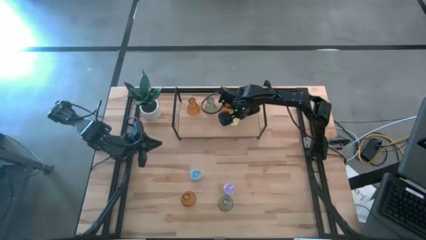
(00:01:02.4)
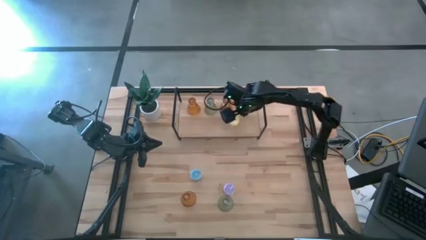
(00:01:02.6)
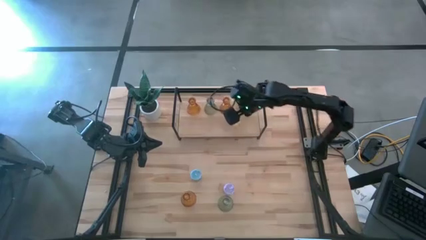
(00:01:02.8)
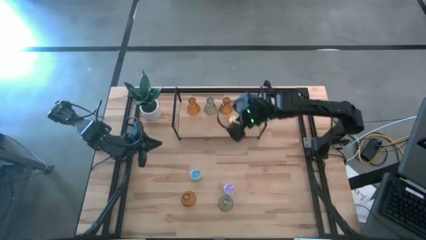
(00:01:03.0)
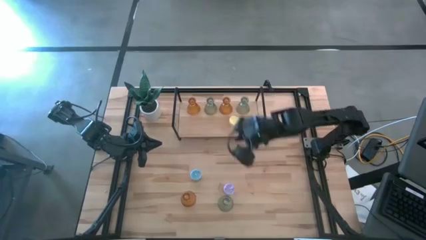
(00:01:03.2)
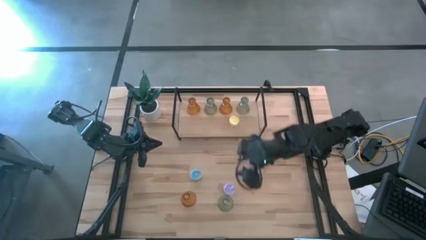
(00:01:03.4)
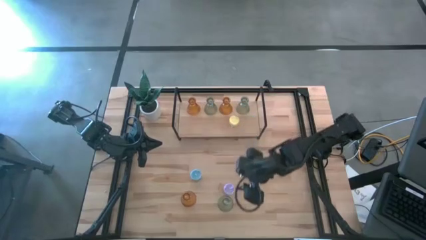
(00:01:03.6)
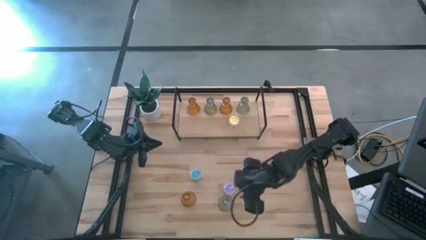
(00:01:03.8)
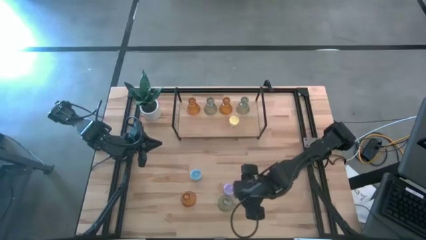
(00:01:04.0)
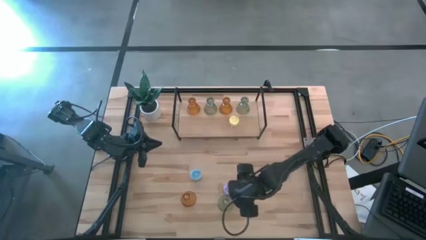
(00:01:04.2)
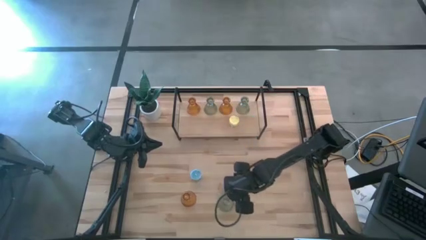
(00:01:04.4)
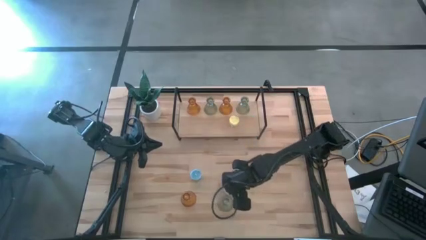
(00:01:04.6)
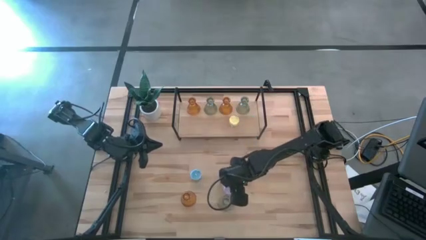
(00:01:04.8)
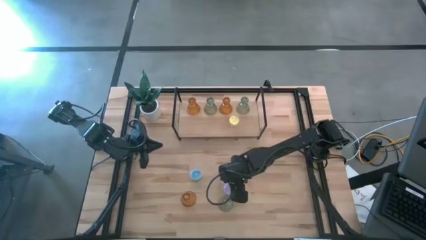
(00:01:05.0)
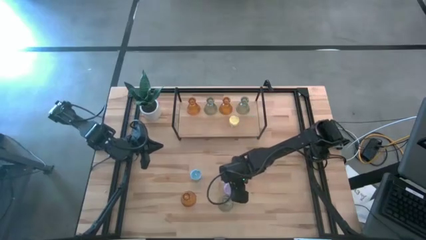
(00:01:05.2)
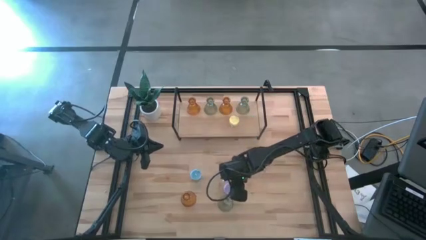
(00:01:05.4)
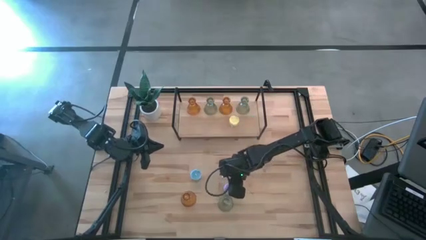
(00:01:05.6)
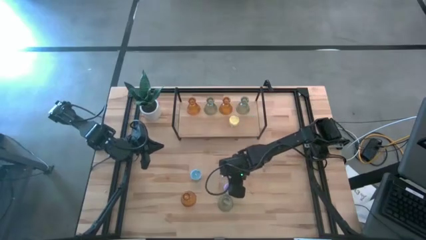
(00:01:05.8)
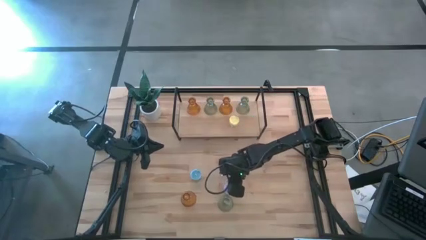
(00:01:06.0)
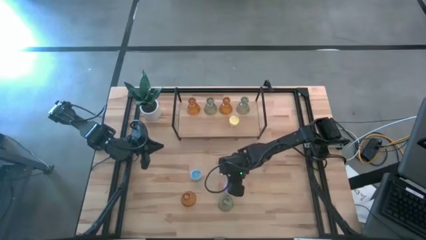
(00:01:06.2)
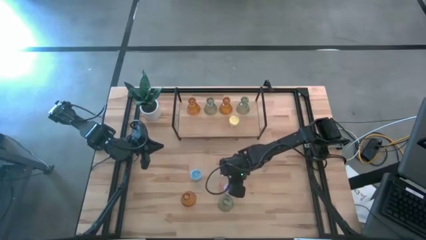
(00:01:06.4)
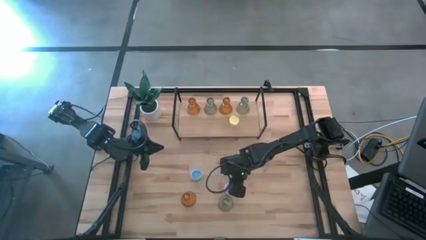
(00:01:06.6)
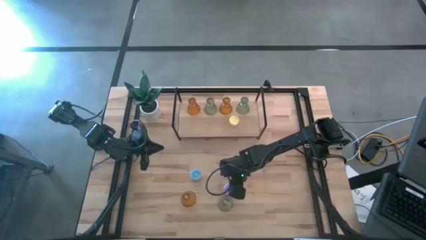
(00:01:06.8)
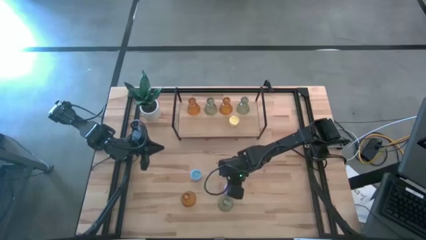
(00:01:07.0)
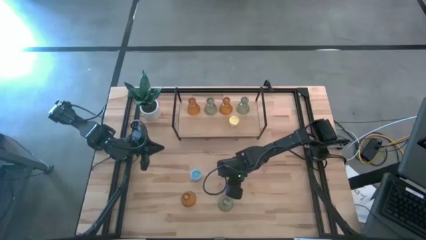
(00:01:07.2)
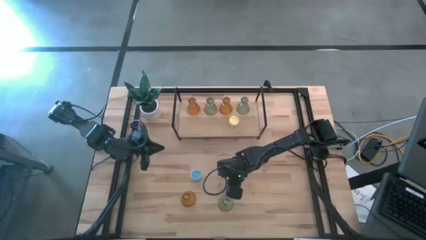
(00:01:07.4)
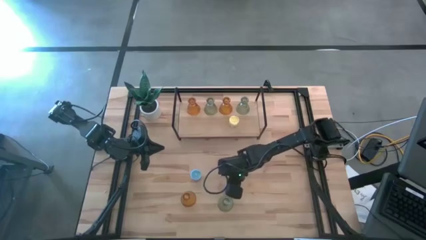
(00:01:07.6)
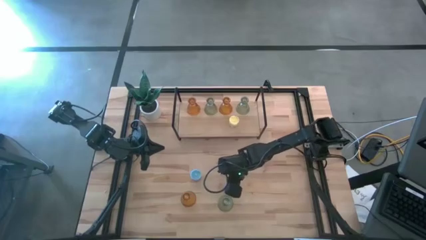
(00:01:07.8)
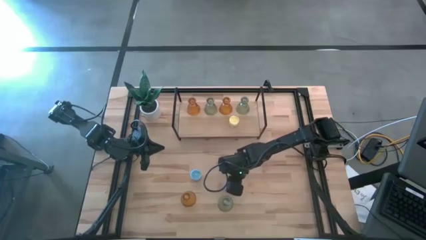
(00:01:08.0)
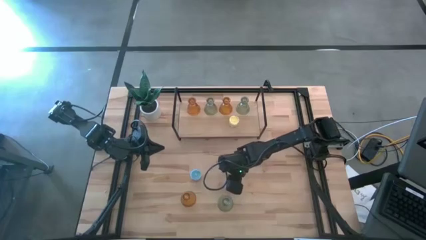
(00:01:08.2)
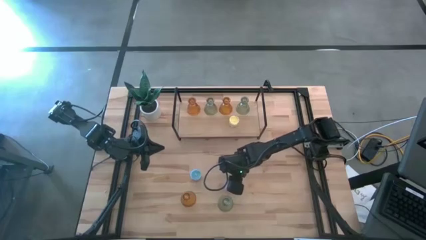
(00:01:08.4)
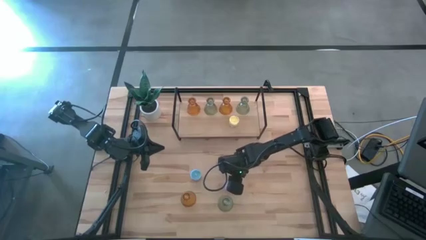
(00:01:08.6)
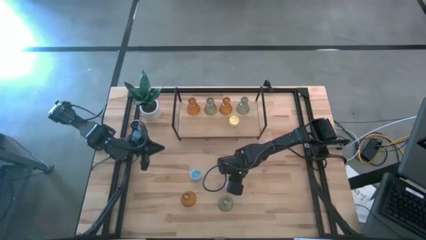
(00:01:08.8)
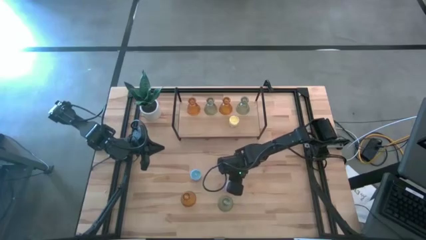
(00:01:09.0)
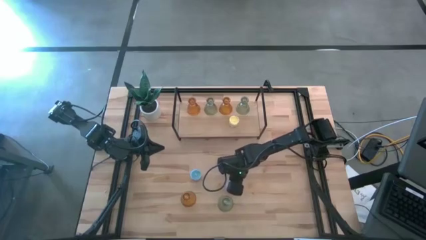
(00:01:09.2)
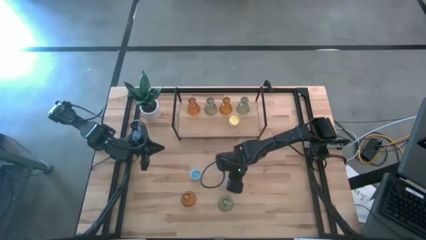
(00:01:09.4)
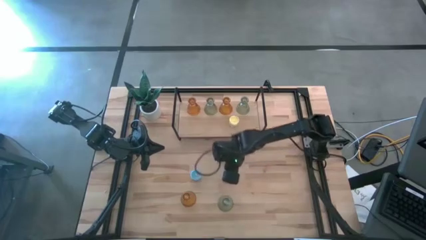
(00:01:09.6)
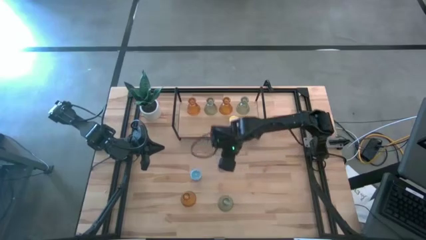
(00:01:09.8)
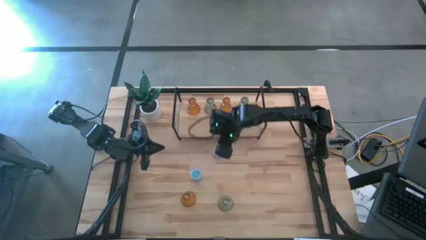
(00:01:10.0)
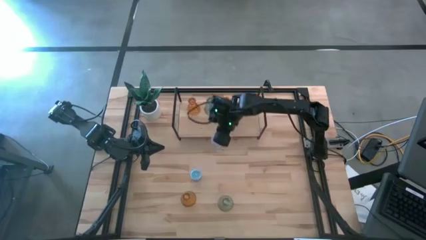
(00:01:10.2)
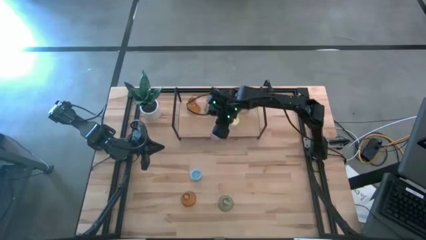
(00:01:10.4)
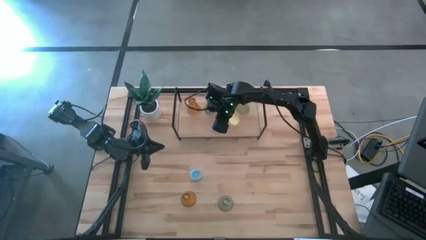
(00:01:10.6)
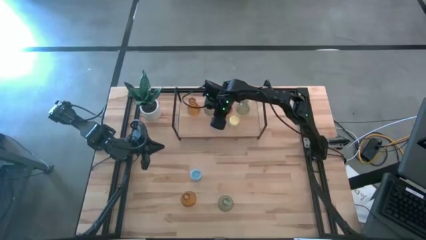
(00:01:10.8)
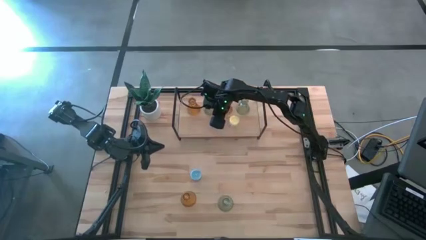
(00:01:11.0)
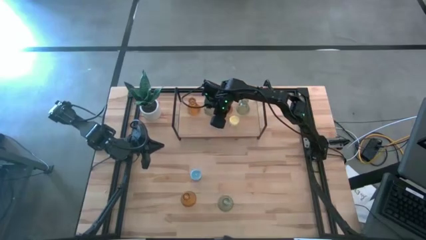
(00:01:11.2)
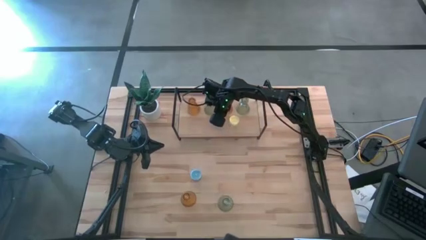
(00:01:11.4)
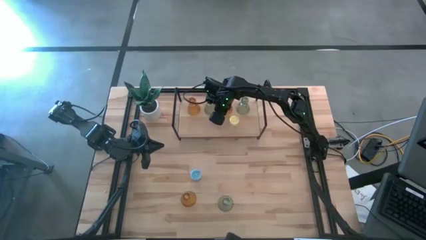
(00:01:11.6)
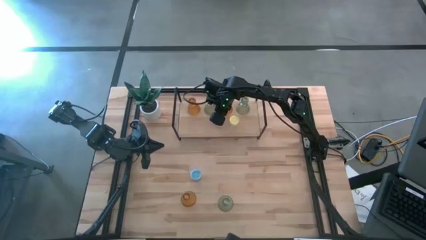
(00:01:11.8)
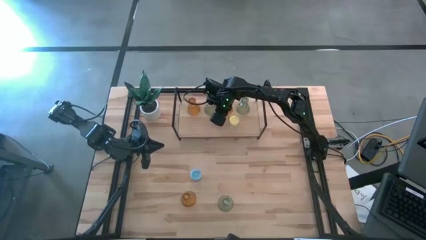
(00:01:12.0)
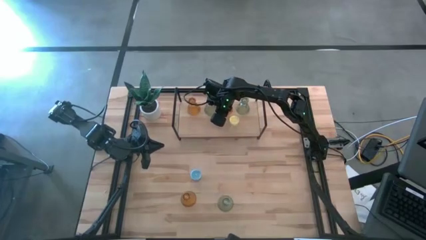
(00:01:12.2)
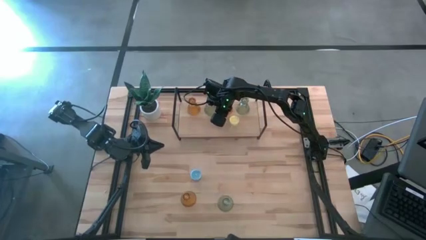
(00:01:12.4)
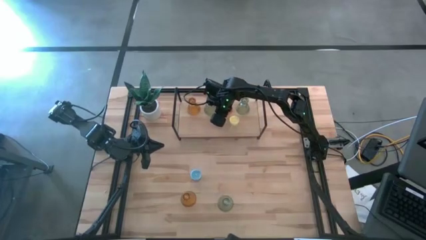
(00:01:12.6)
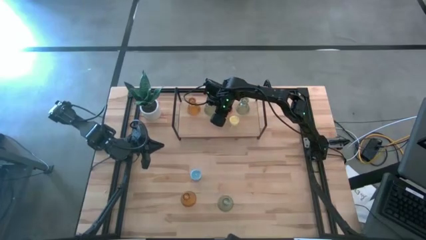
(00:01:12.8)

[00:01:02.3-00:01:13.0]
Task: Pick & Place candle stick holders
Put the purple candle on the shelf
